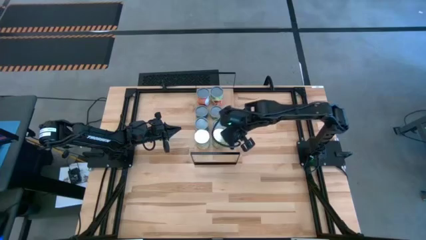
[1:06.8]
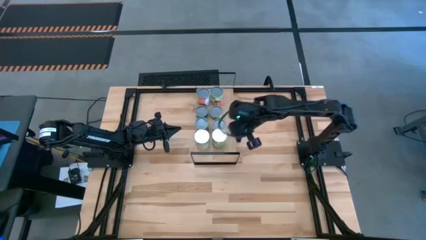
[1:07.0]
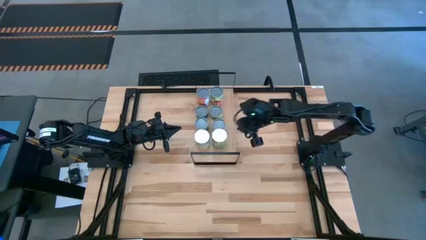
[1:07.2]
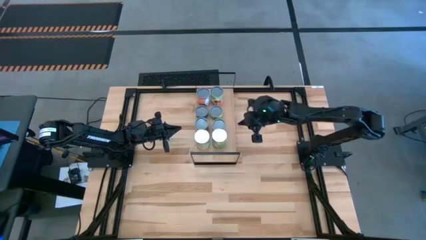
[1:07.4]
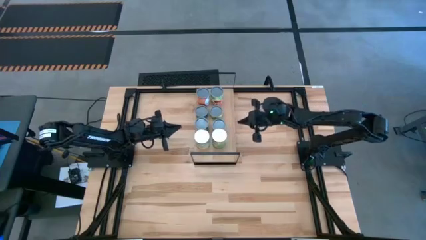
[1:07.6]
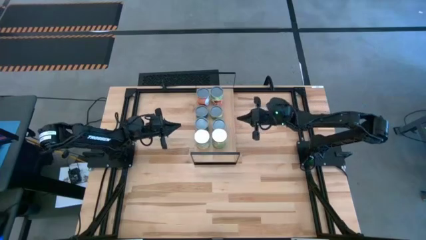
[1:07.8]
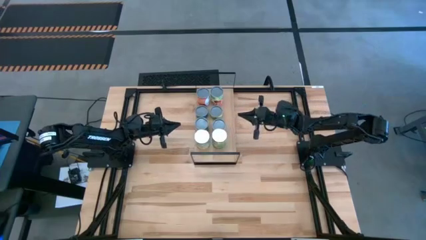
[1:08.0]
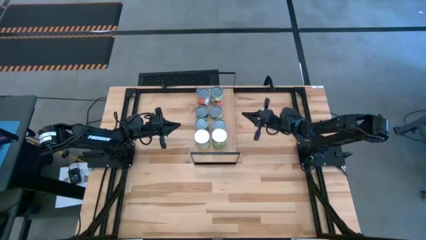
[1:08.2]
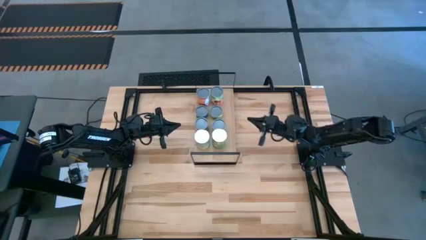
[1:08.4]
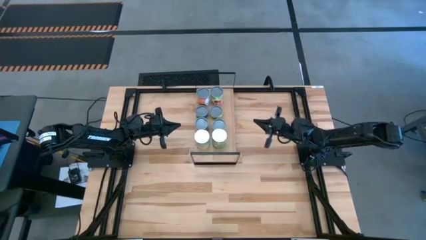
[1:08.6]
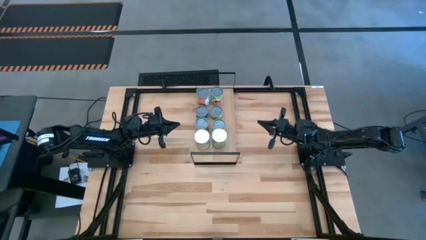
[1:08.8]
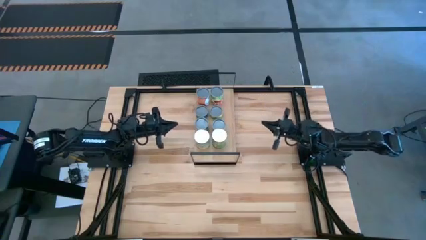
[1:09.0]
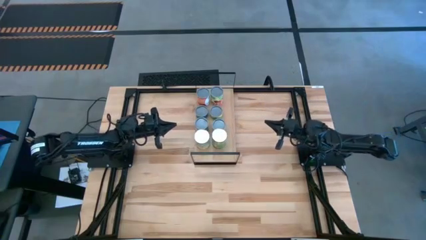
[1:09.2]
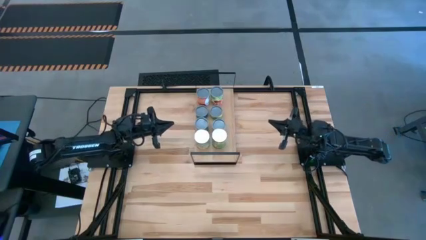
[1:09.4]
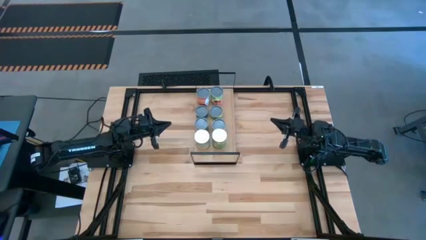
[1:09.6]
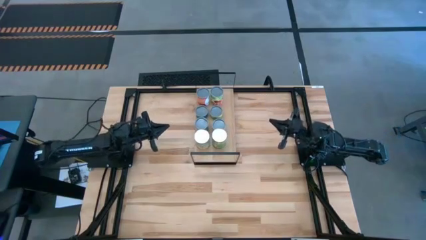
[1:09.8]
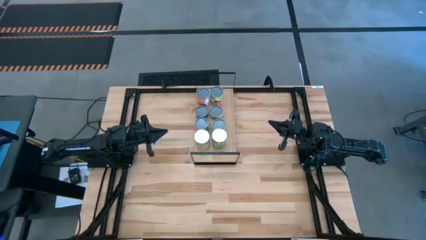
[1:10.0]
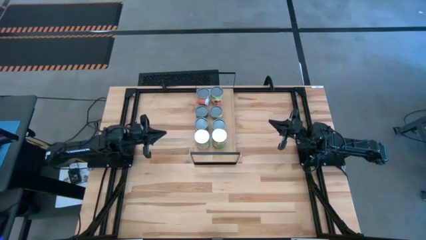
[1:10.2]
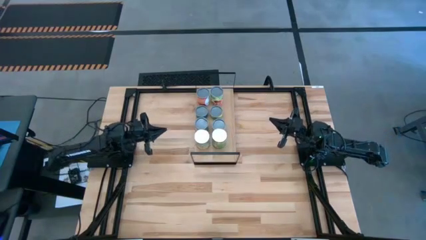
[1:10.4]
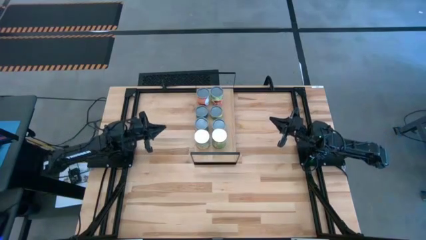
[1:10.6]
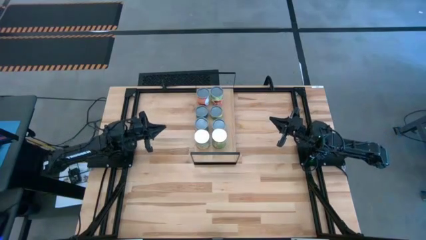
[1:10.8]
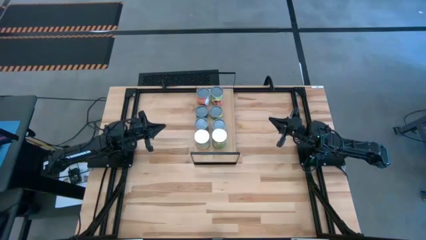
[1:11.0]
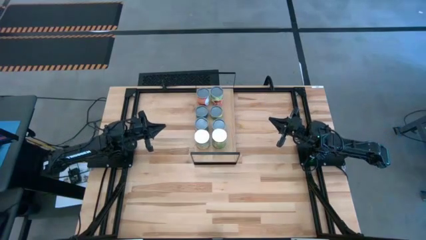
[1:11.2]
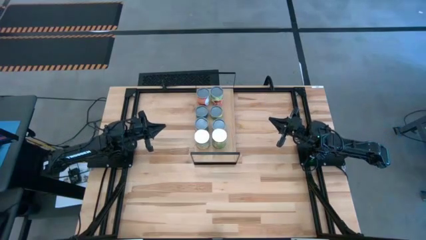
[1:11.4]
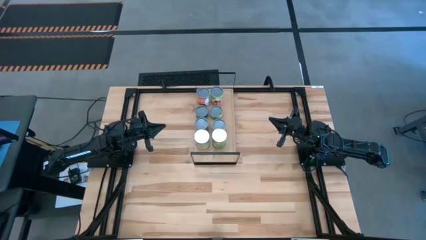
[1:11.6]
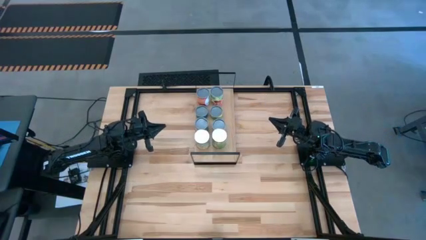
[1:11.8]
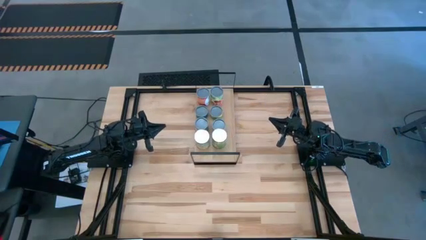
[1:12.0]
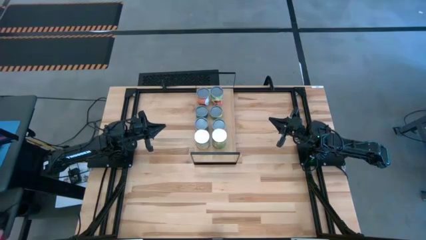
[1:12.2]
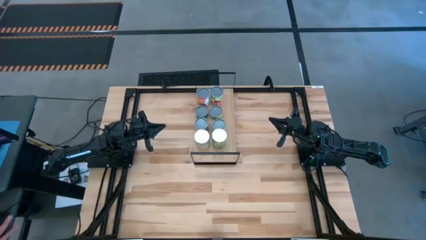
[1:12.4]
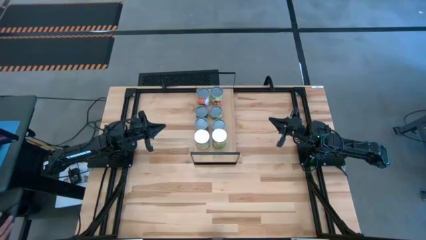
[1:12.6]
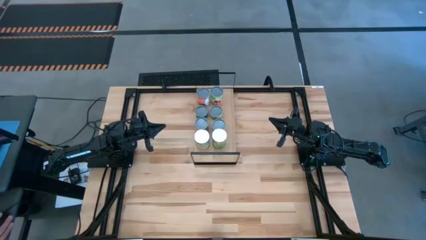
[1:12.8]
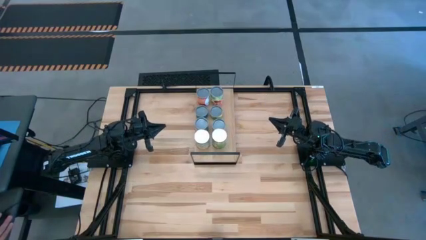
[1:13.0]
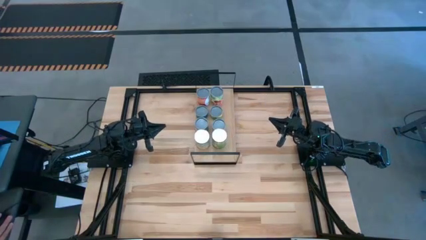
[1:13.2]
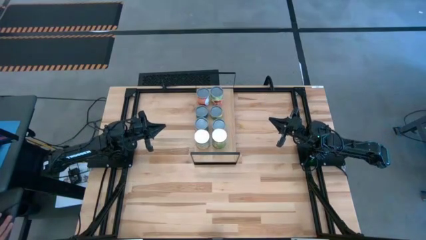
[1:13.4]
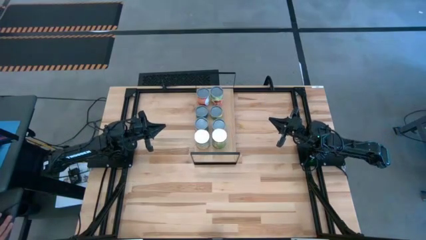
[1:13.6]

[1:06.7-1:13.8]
Task: Pick and place cans onto a shelf
Return to Home Position

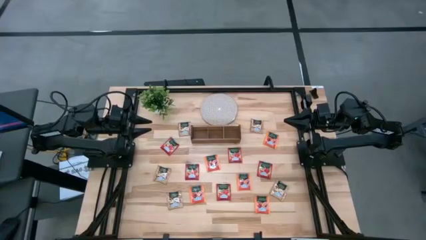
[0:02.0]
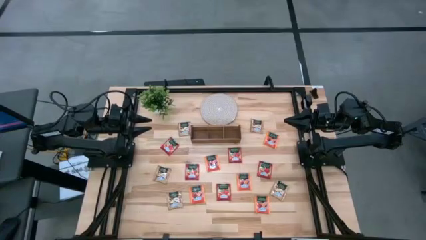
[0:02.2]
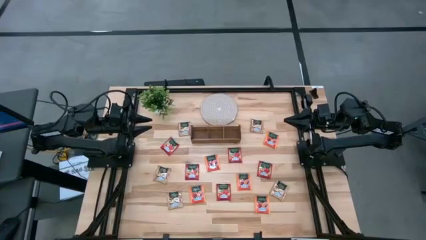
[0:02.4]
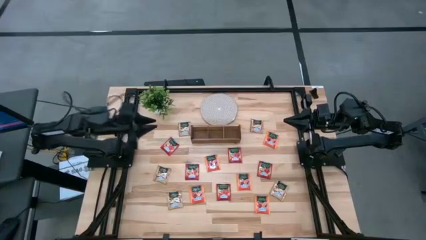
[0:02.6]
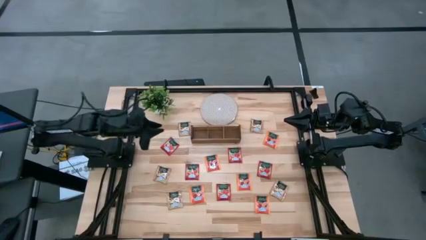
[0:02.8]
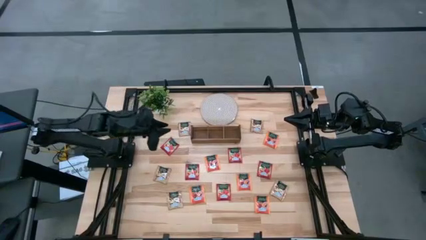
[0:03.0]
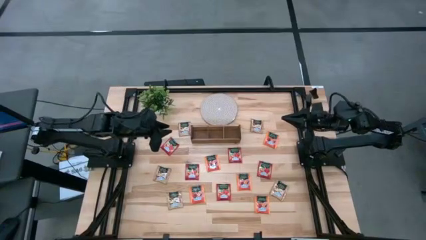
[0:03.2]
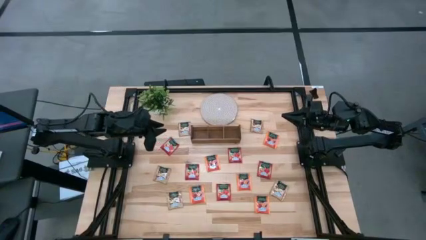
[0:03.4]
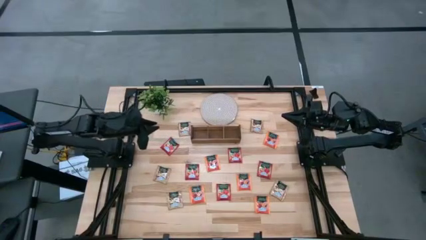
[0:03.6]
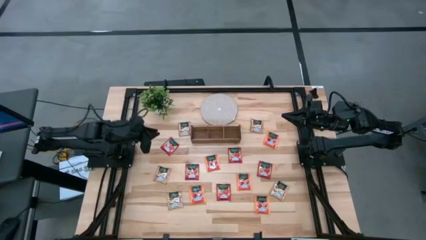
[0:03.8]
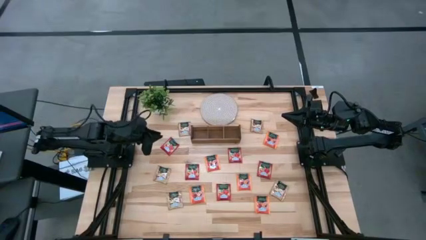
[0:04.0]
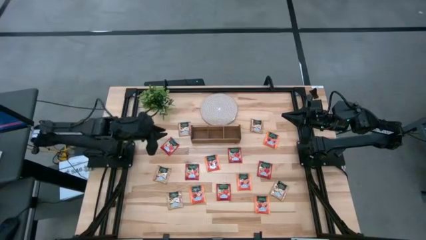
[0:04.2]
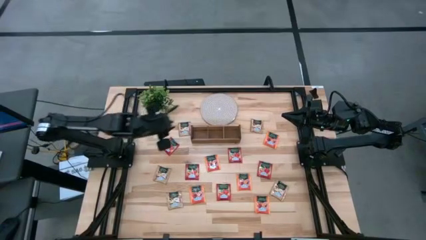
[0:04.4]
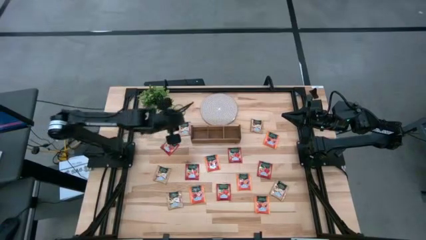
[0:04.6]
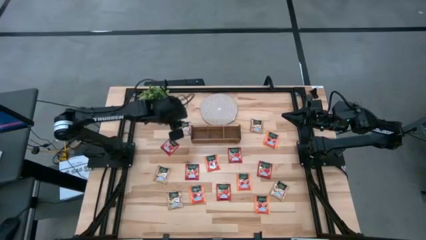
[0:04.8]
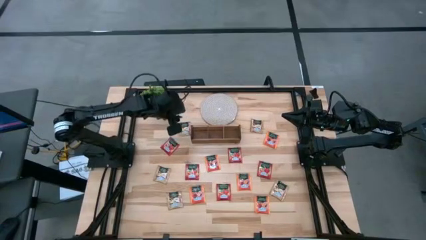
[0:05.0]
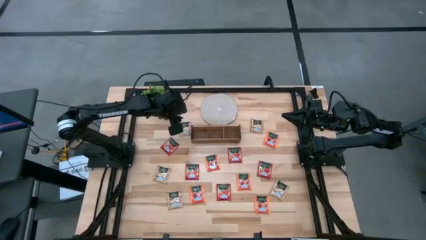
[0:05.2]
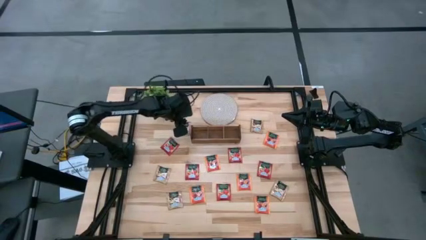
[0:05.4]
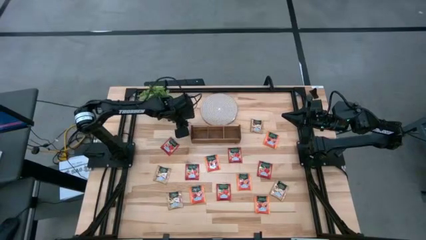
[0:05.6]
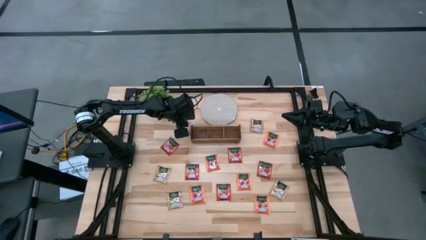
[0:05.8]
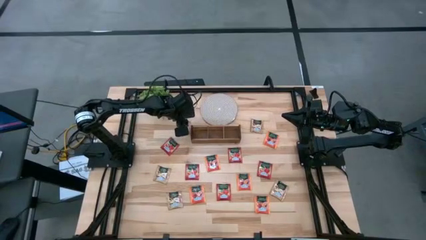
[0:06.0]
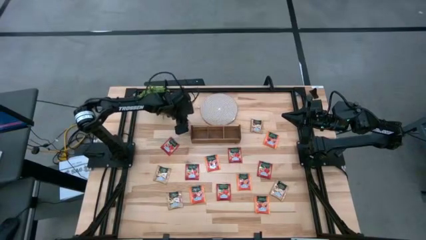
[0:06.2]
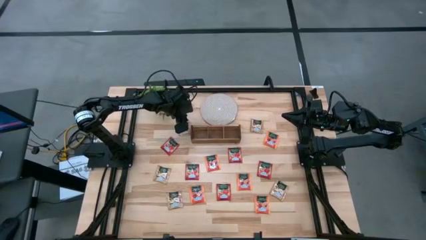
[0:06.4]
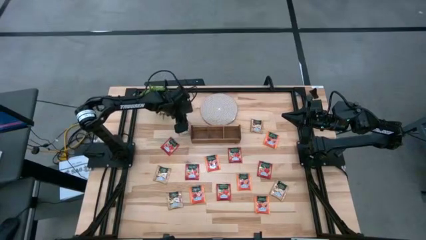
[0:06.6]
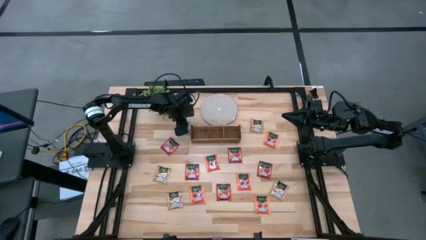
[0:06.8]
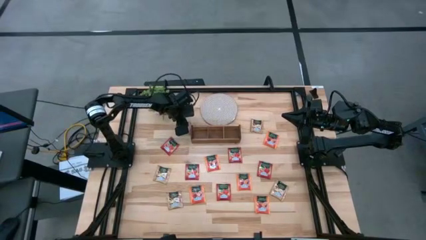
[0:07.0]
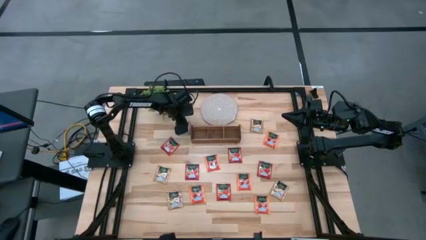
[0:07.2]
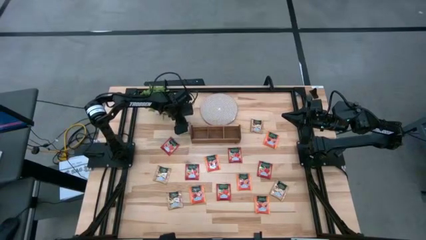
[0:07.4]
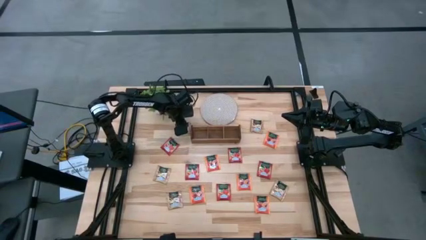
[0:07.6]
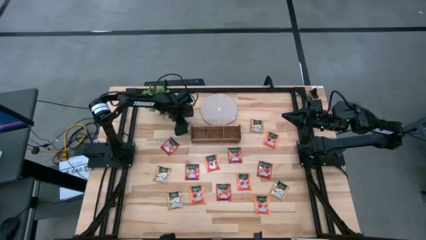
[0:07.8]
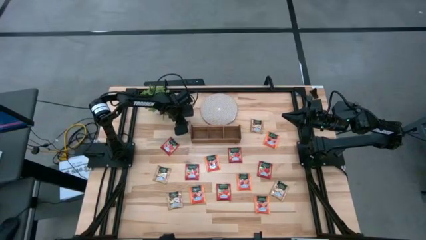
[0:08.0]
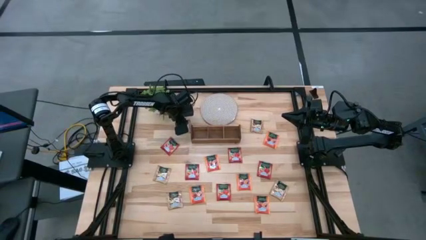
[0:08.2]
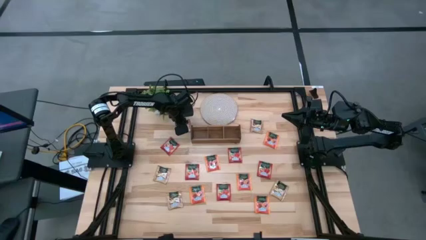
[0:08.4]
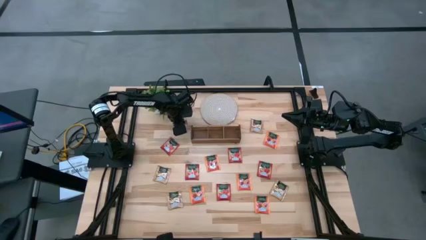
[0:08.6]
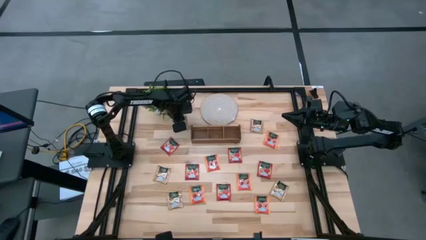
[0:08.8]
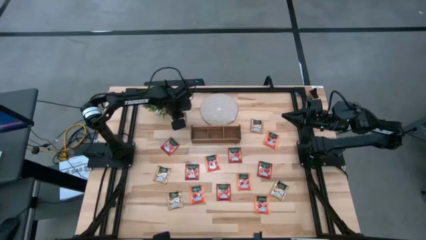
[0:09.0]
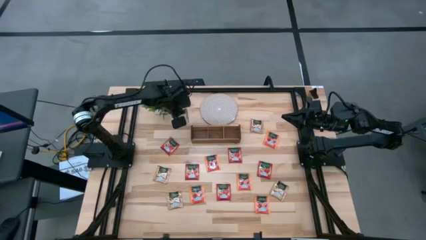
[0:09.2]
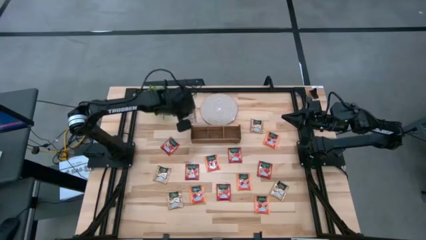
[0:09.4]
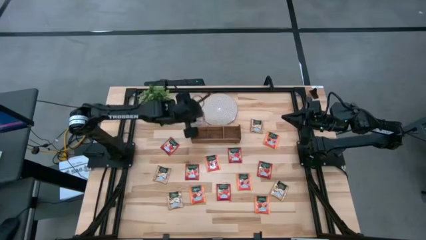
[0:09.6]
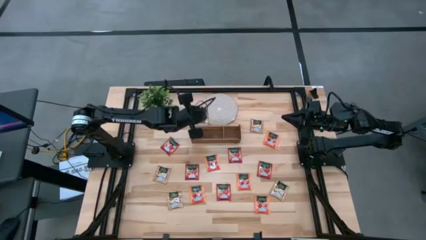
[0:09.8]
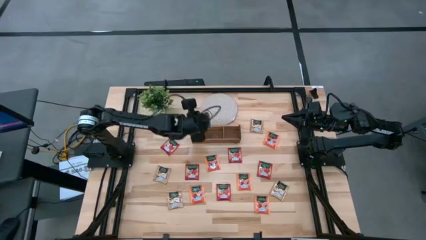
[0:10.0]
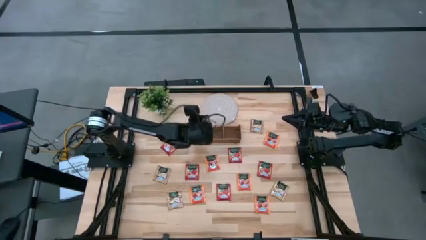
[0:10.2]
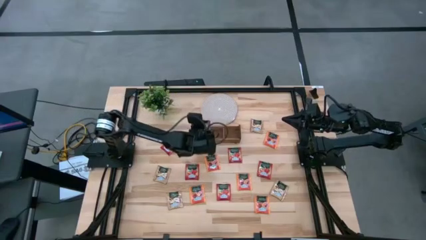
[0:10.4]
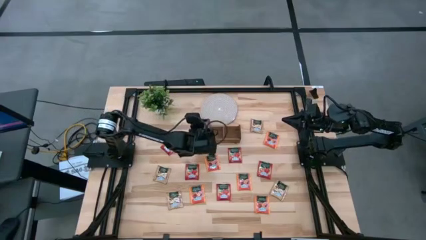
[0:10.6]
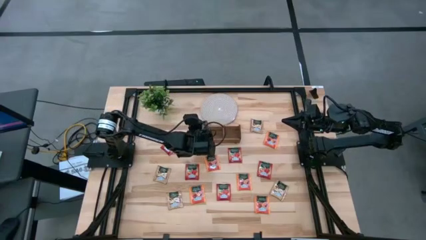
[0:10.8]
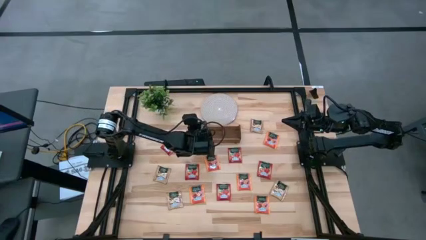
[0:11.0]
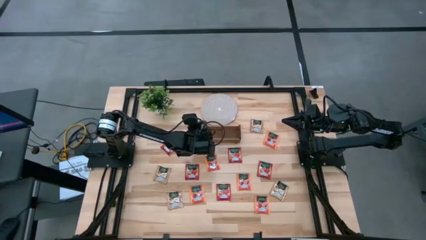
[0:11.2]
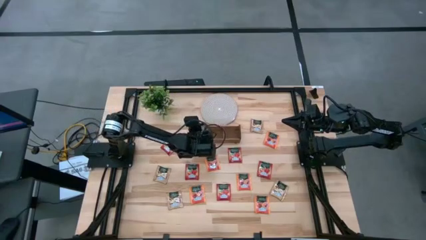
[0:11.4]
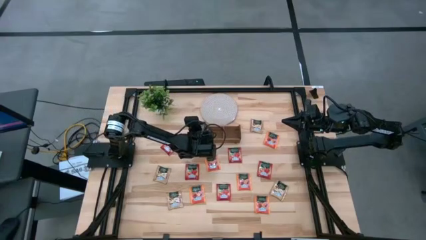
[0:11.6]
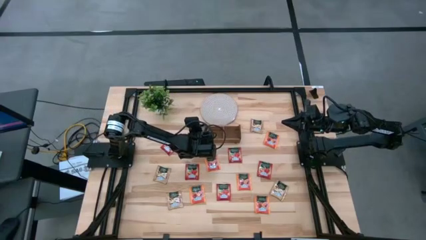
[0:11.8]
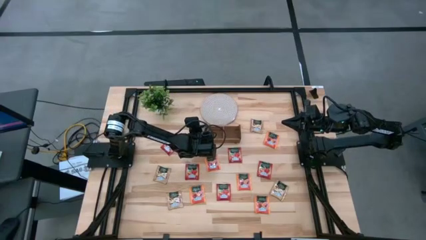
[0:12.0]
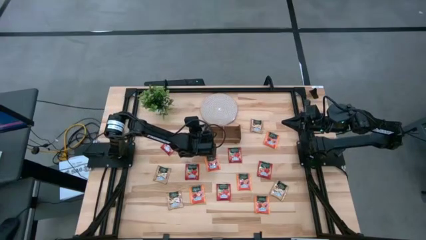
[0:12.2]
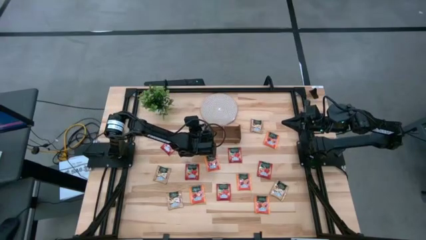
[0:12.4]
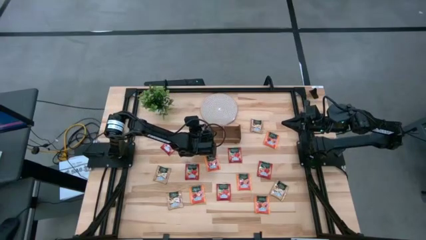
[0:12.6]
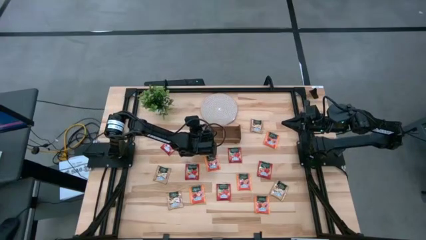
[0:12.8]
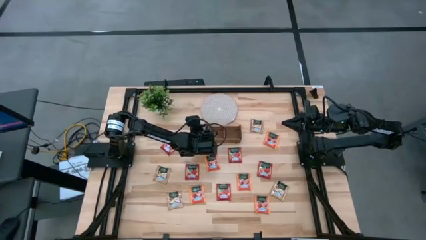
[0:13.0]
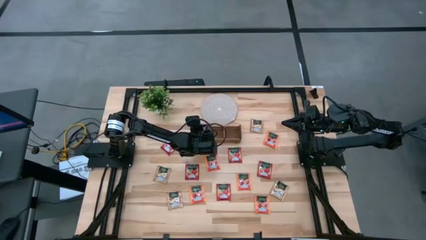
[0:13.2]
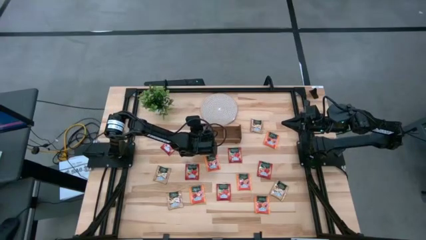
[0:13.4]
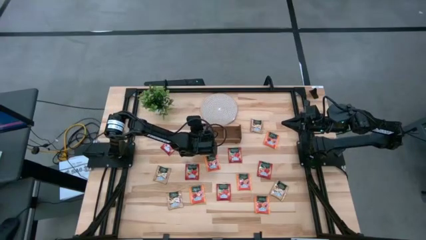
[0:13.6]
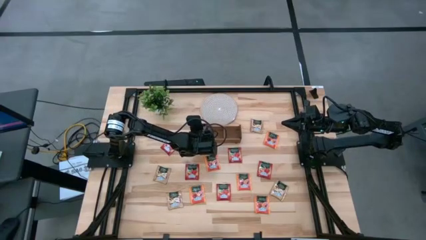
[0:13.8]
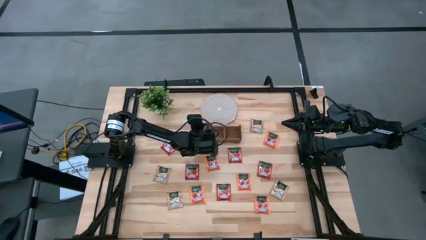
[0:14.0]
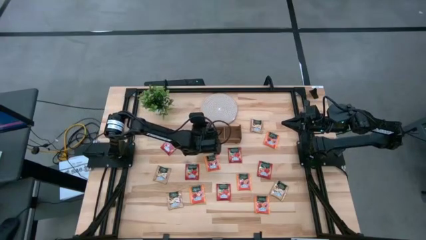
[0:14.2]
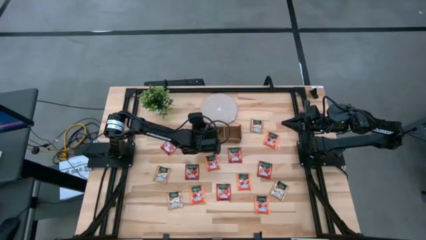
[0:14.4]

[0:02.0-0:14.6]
Task: Pick & Place Tea
Put the brown tea bag into the left of the wooden organizer
